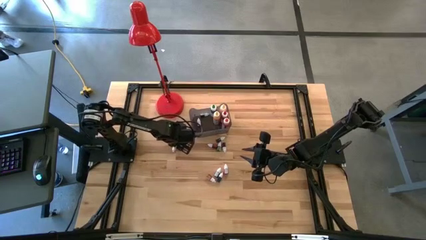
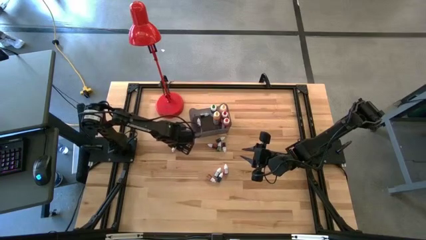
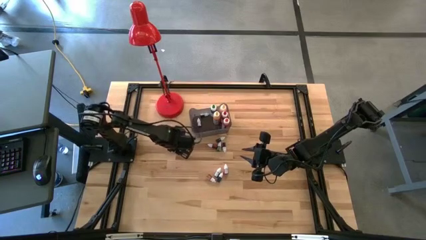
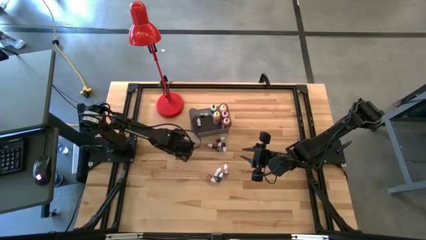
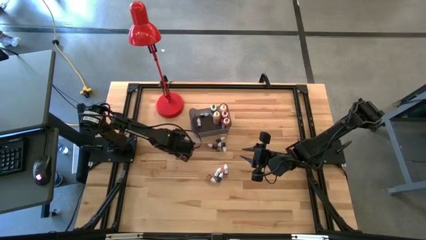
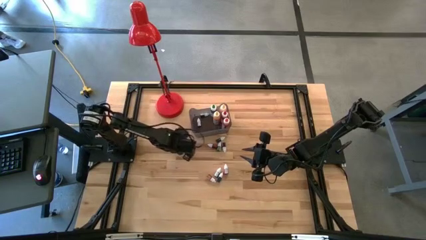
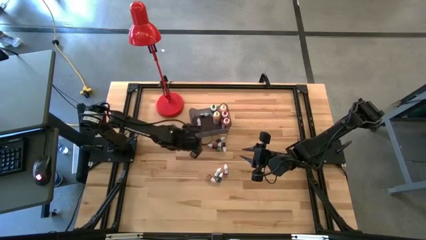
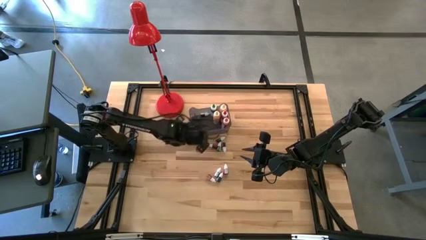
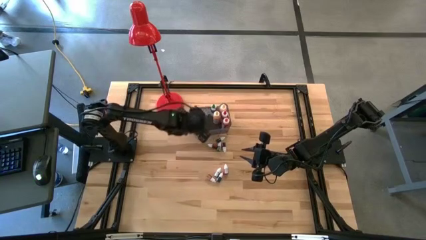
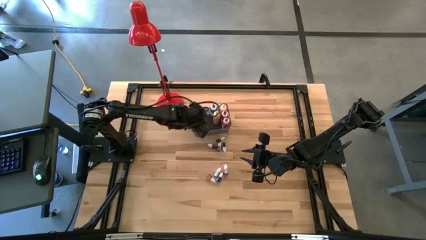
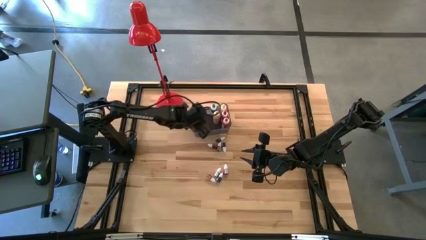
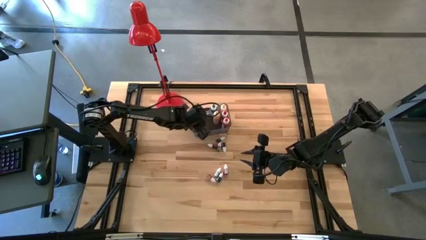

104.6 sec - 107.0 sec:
Task: Pick & Place food coloring
Put the left small green food coloring bottle into the bin

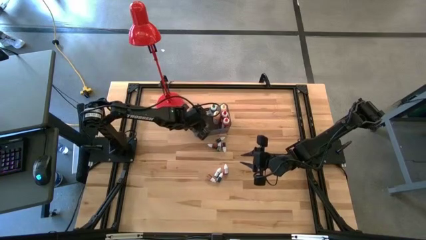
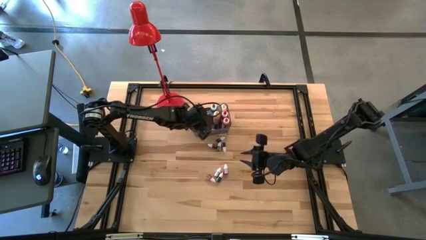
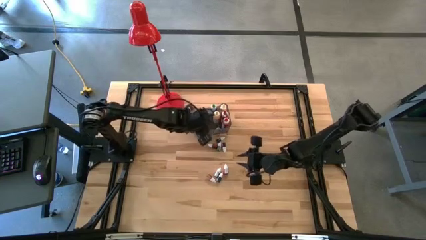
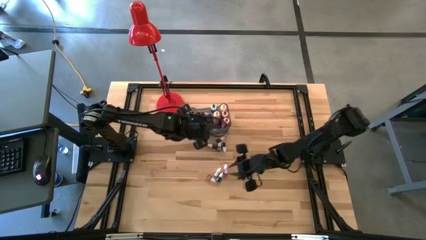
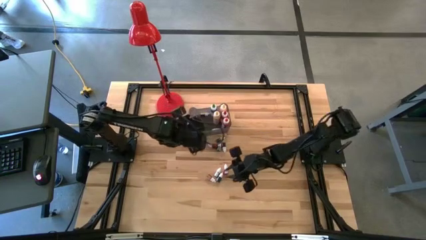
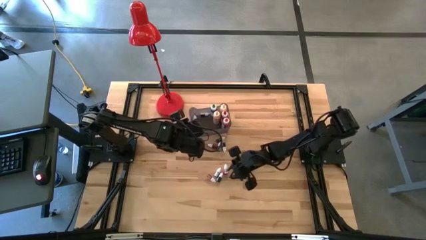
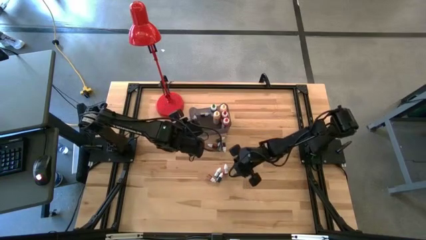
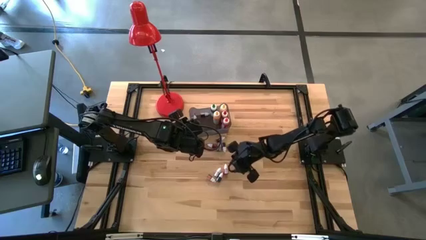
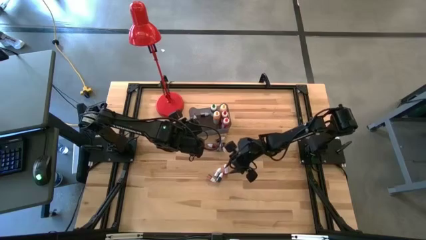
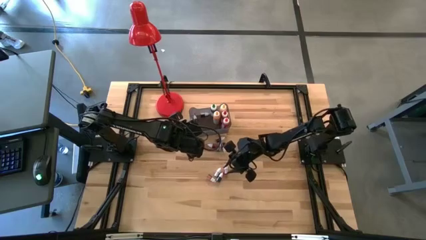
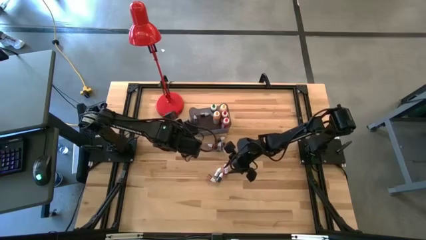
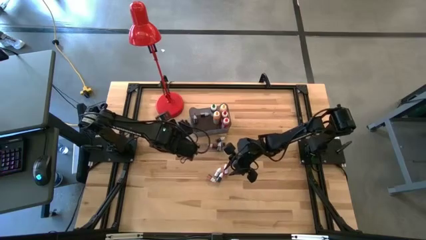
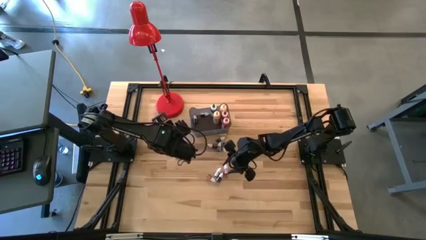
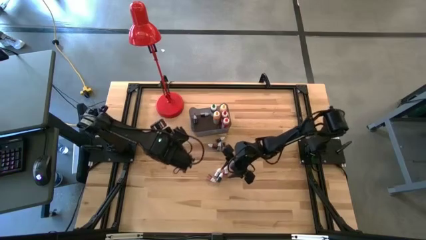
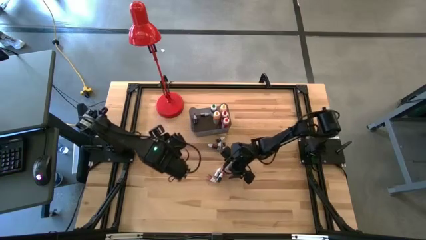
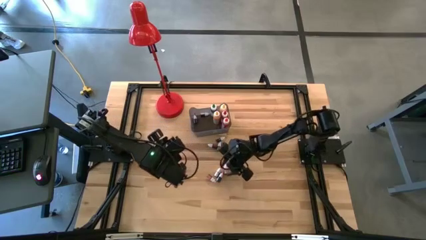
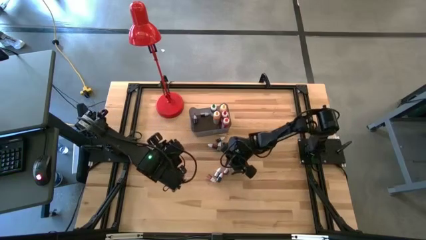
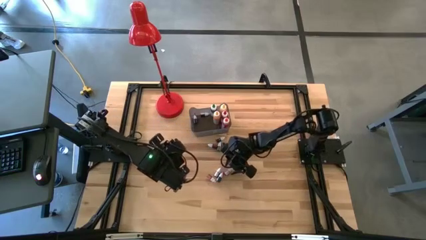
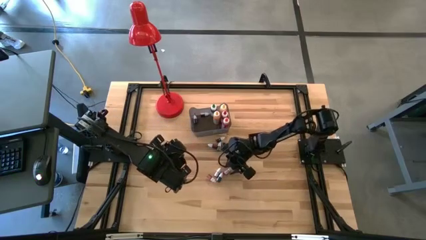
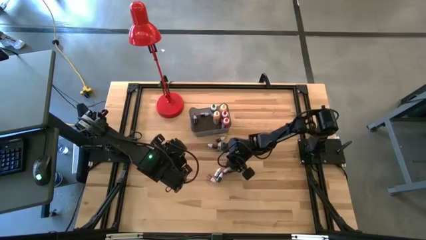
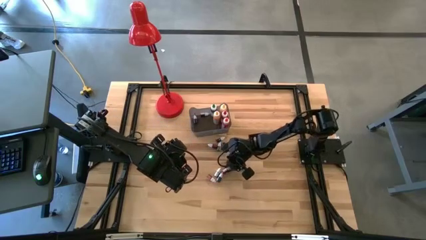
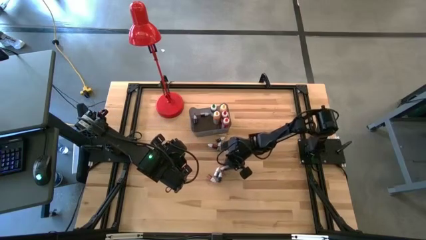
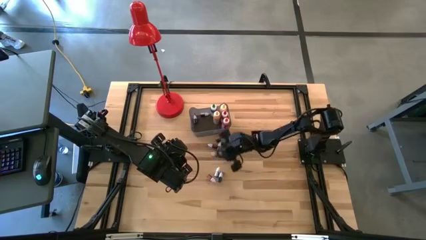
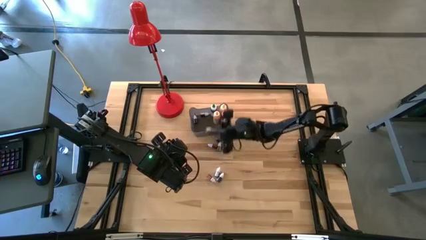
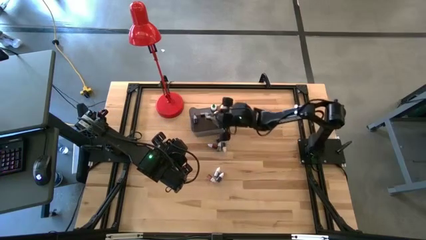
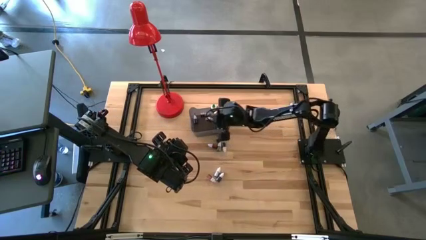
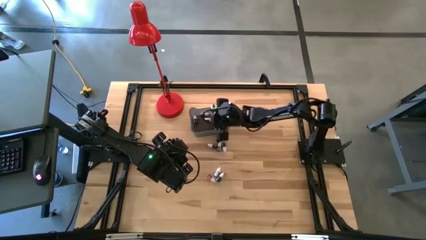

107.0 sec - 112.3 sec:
Put the bottom small red food coloring bottle into the bin

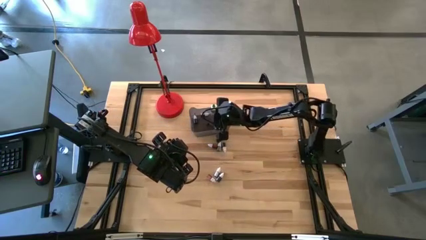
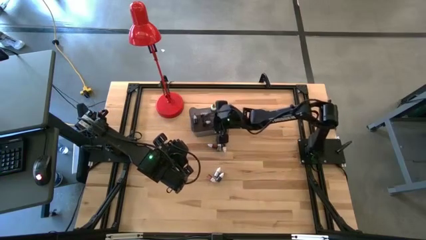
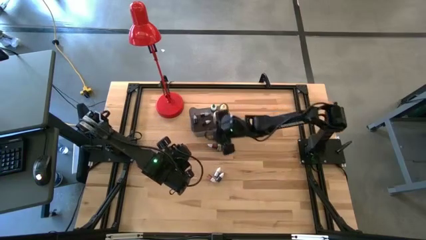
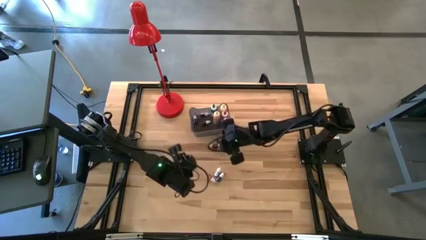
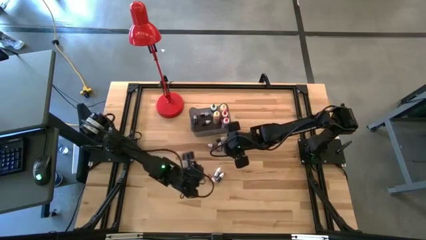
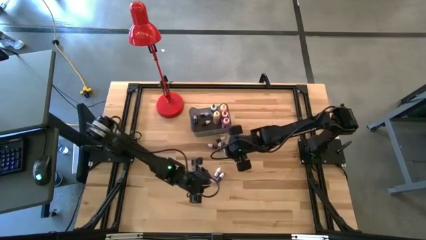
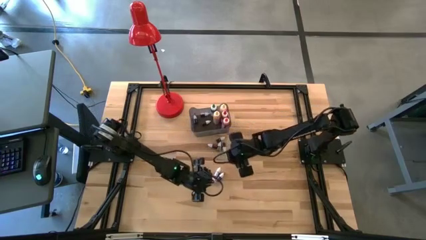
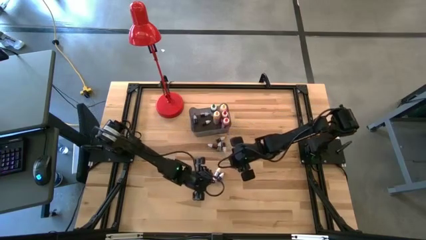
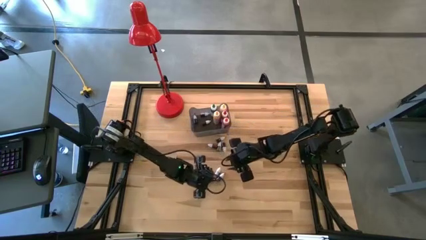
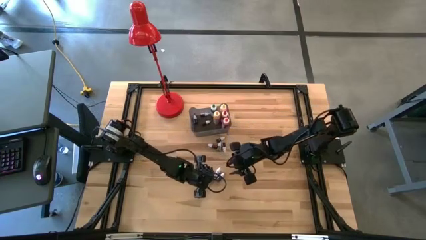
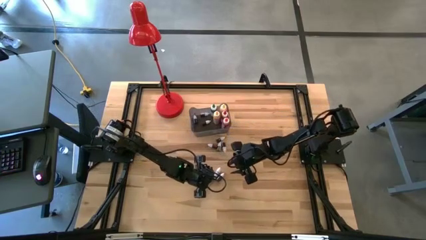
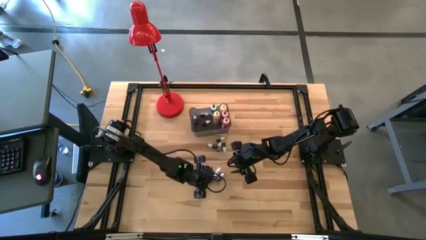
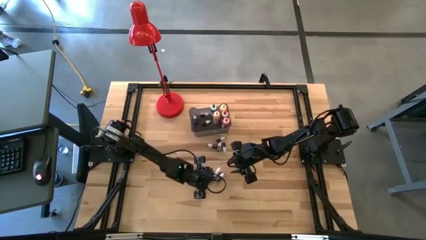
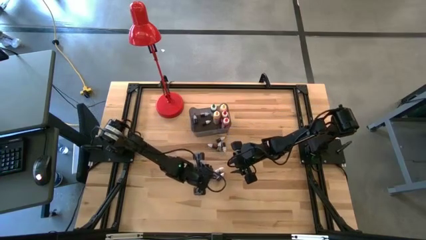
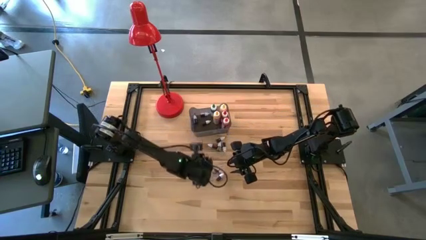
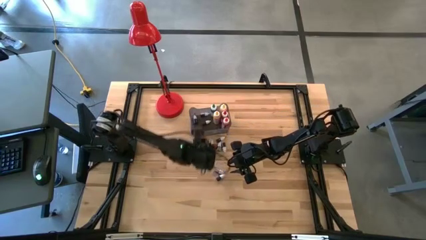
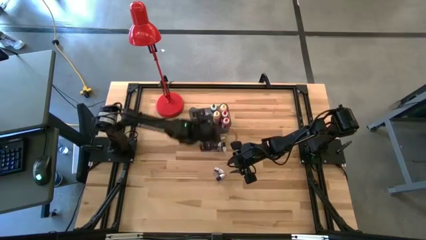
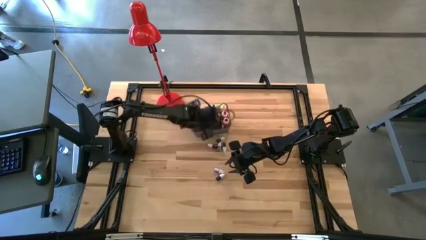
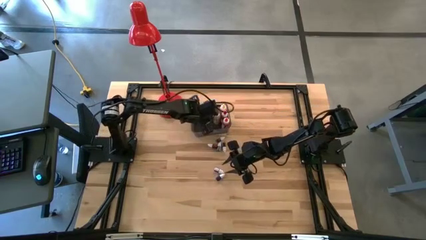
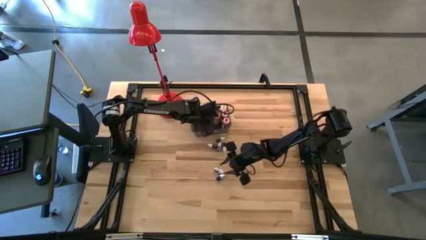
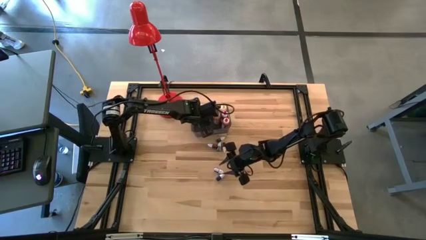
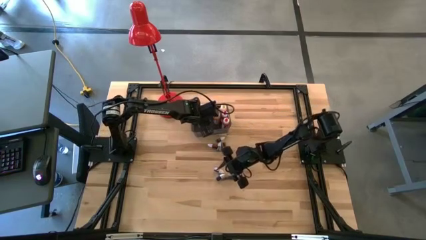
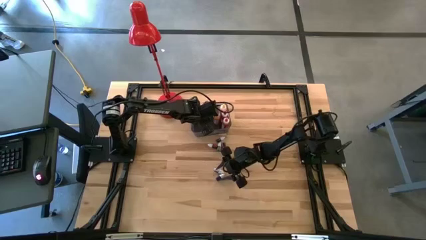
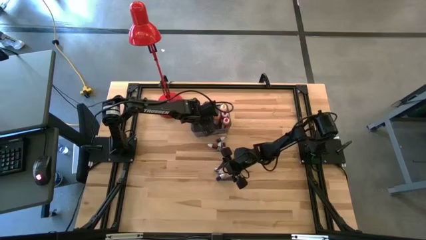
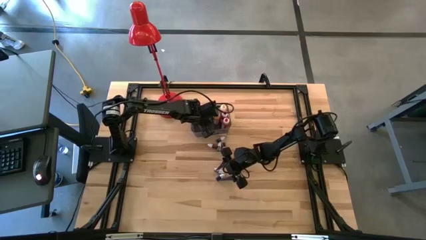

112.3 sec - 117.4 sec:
Put the bottom small orange food coloring bottle into the bin

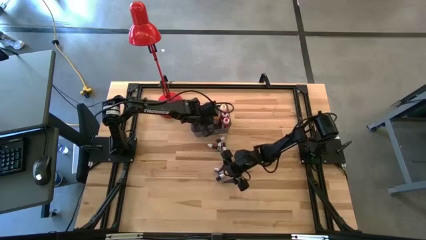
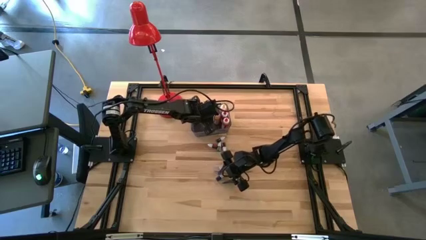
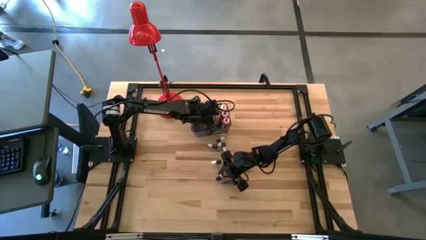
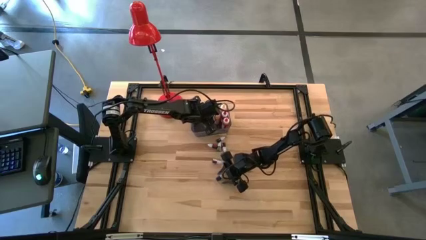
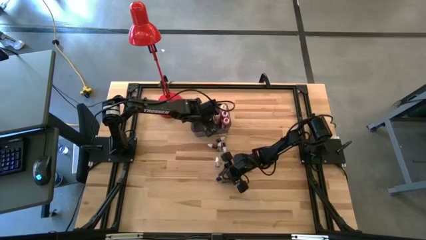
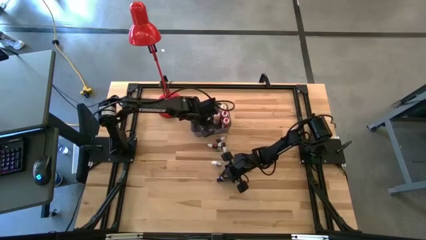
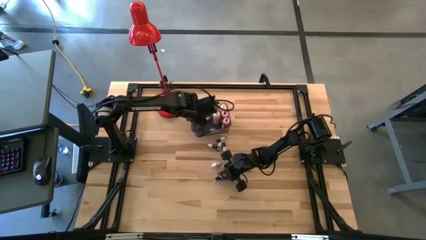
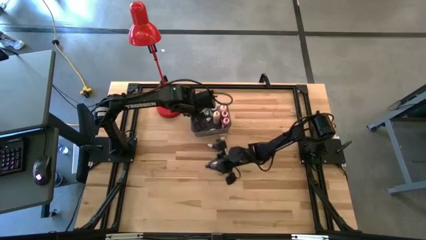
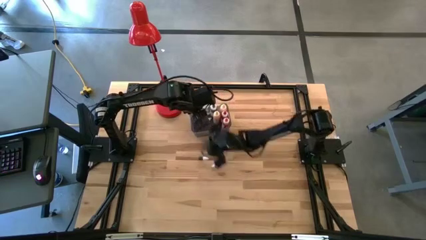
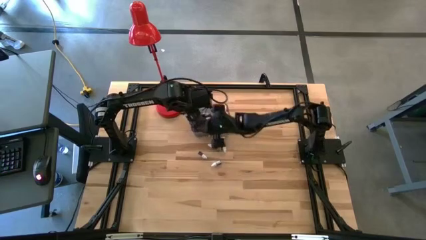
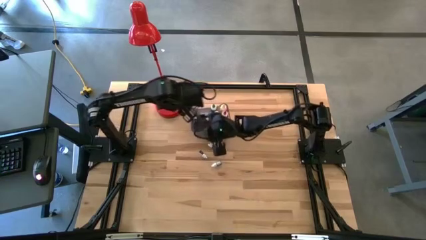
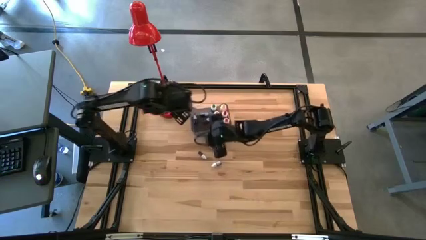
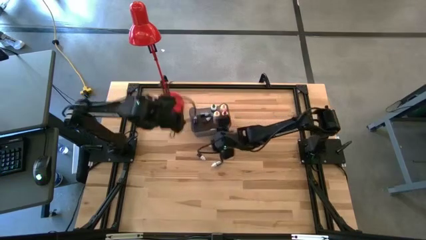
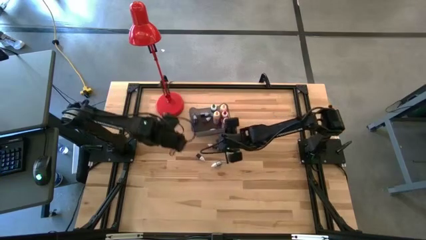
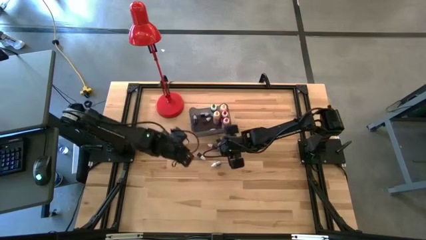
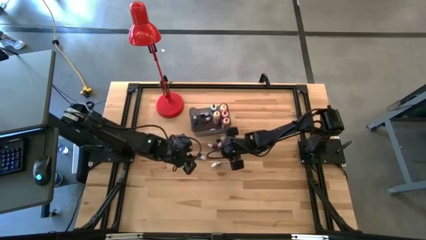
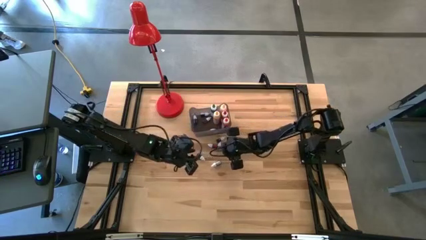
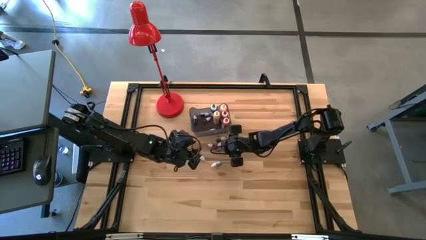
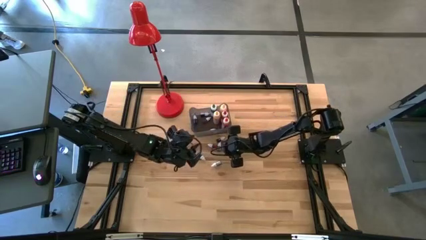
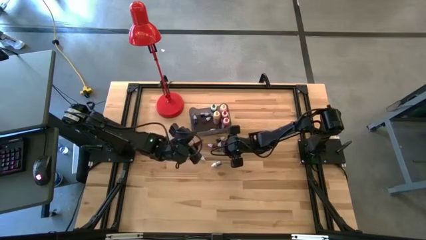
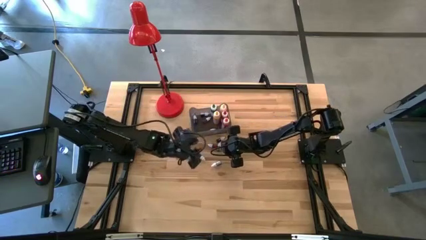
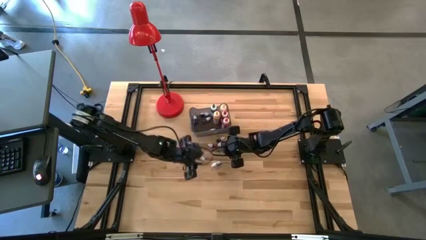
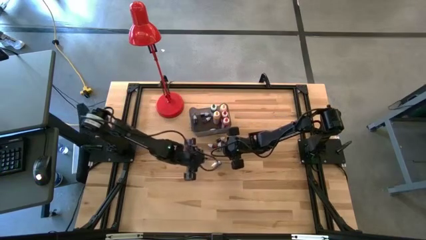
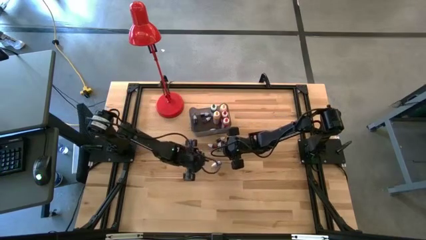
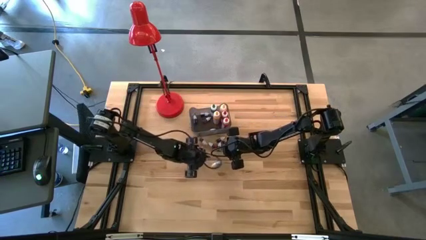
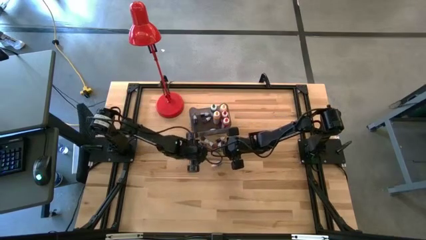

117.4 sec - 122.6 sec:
Put the bottom small black food coloring bottle into the bin
